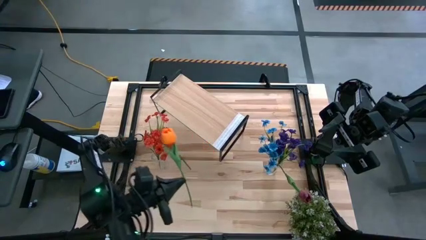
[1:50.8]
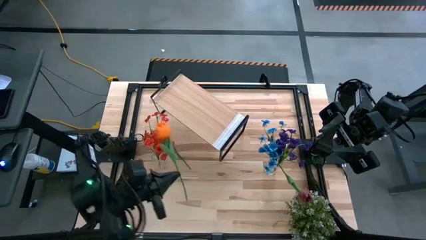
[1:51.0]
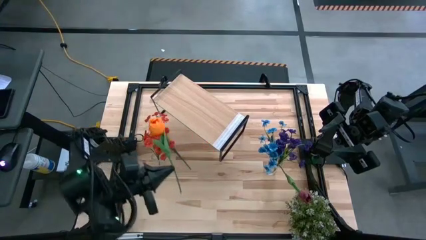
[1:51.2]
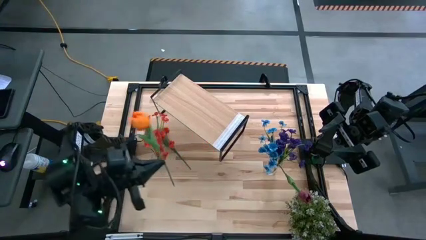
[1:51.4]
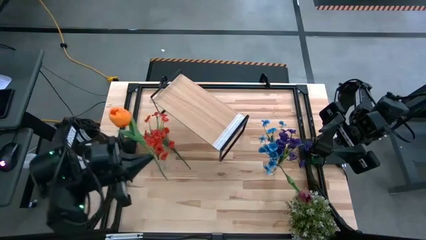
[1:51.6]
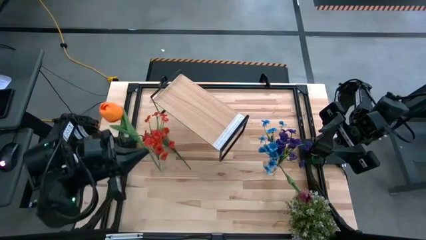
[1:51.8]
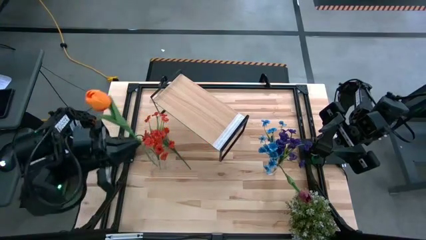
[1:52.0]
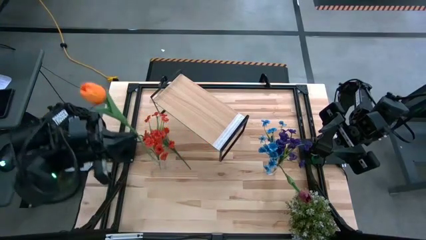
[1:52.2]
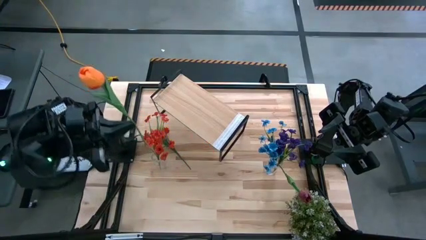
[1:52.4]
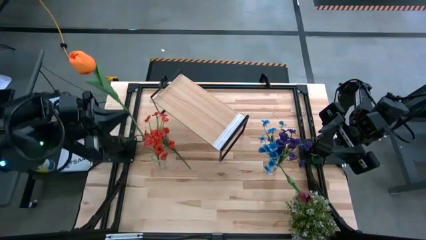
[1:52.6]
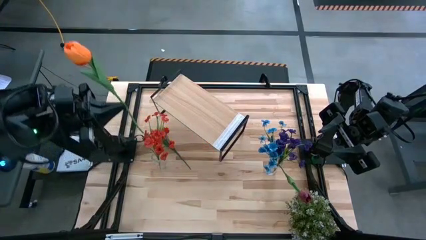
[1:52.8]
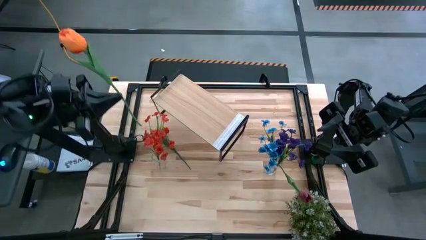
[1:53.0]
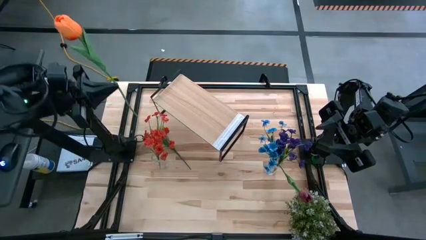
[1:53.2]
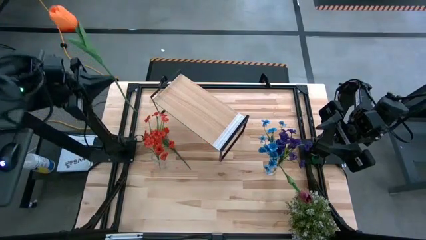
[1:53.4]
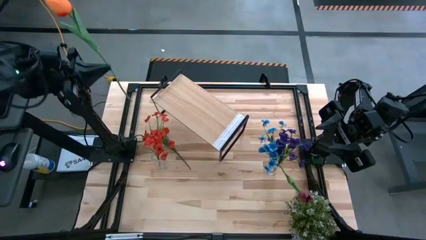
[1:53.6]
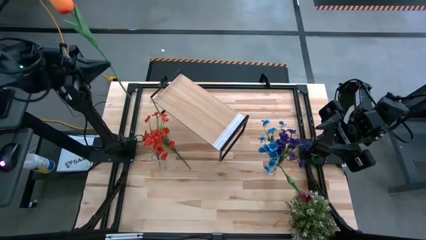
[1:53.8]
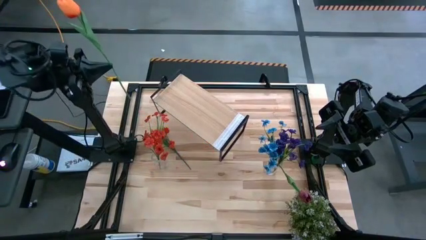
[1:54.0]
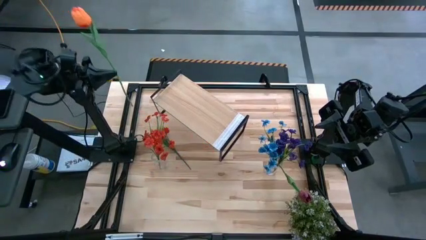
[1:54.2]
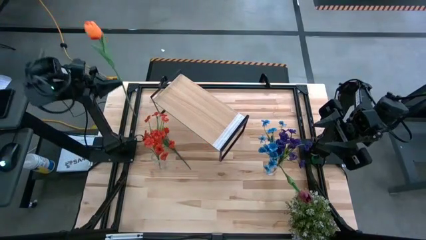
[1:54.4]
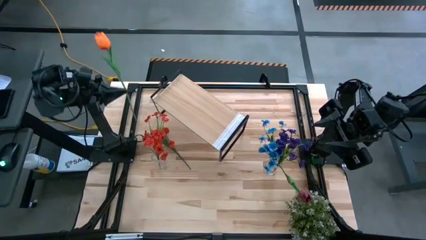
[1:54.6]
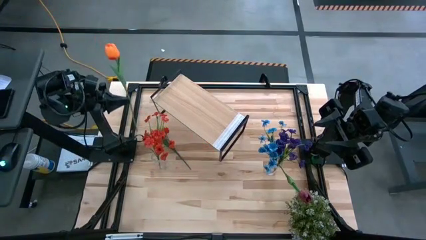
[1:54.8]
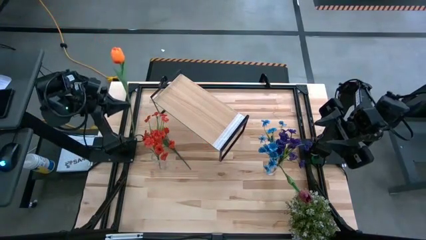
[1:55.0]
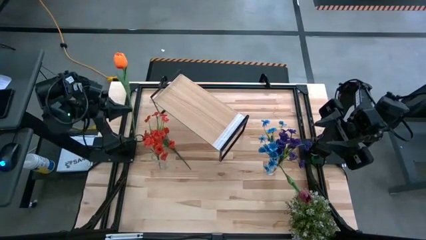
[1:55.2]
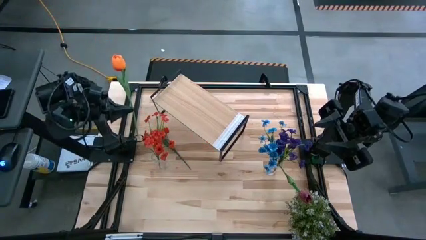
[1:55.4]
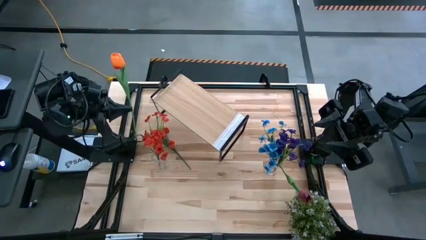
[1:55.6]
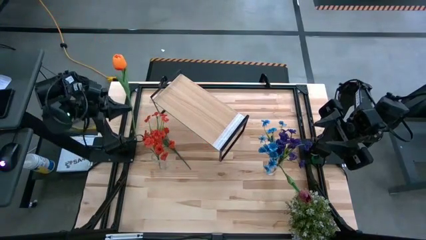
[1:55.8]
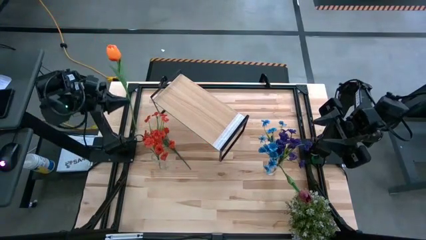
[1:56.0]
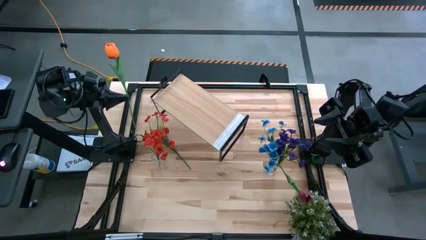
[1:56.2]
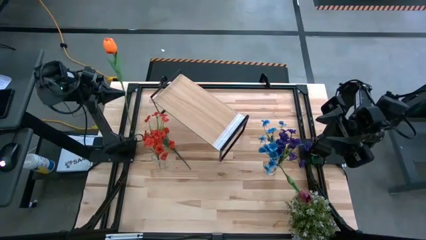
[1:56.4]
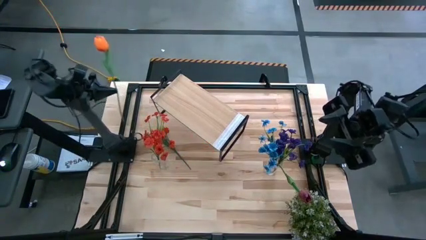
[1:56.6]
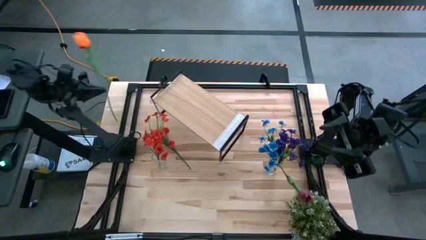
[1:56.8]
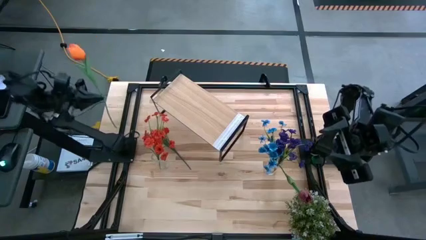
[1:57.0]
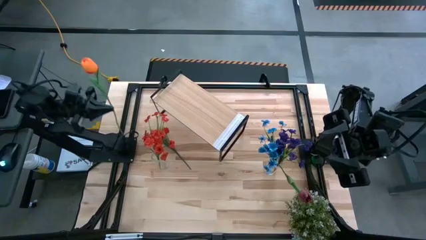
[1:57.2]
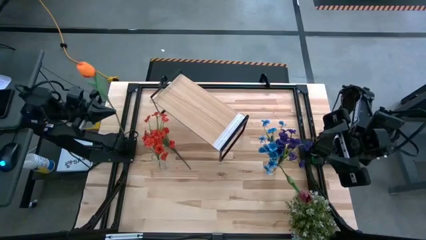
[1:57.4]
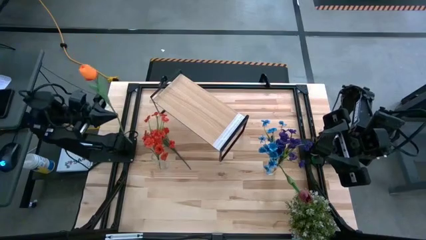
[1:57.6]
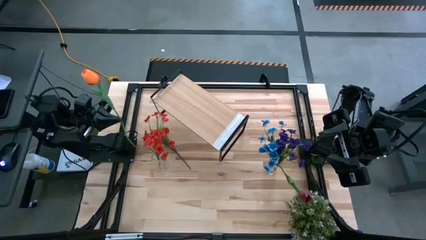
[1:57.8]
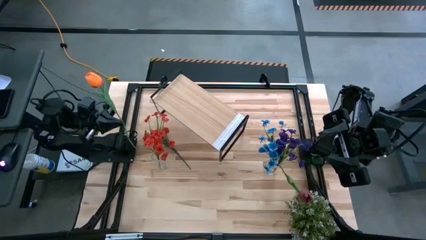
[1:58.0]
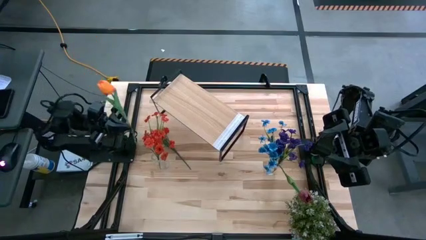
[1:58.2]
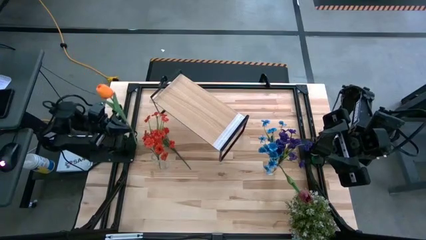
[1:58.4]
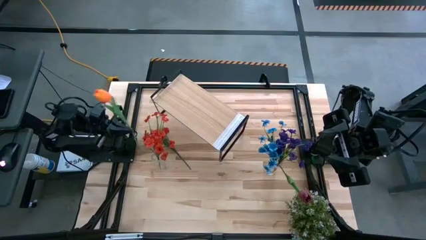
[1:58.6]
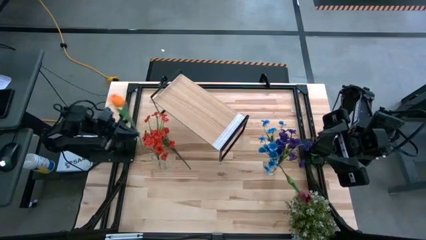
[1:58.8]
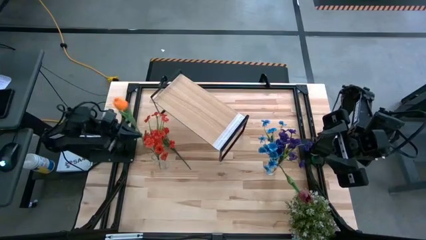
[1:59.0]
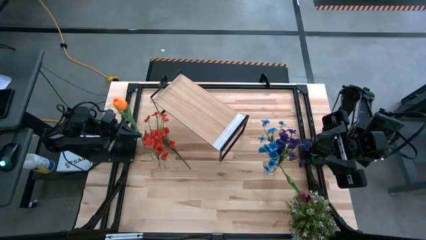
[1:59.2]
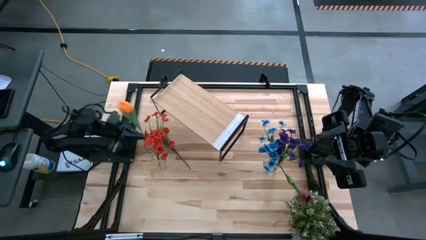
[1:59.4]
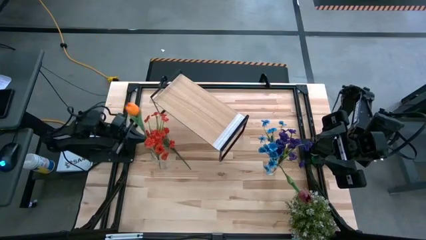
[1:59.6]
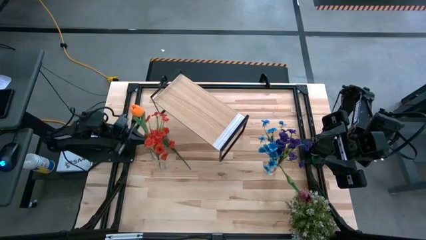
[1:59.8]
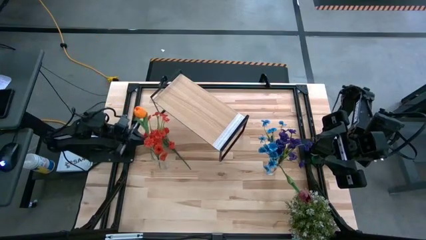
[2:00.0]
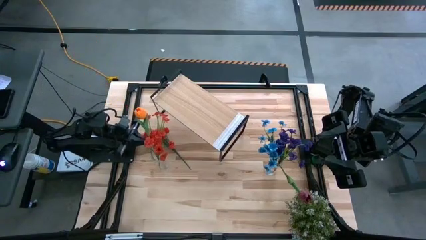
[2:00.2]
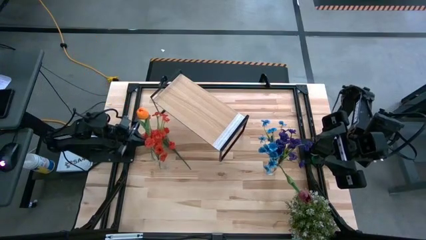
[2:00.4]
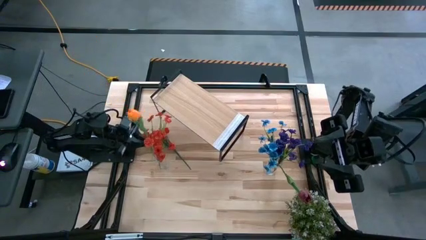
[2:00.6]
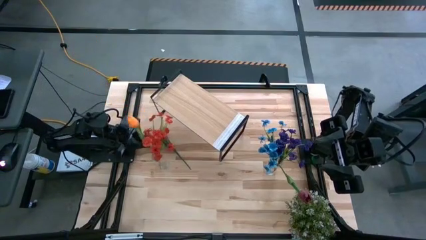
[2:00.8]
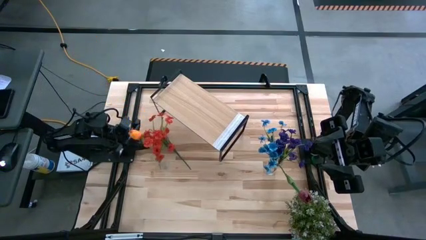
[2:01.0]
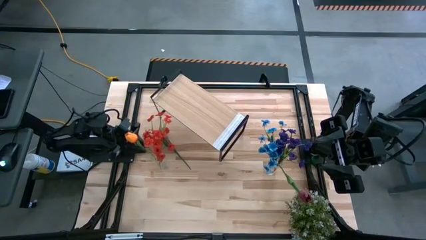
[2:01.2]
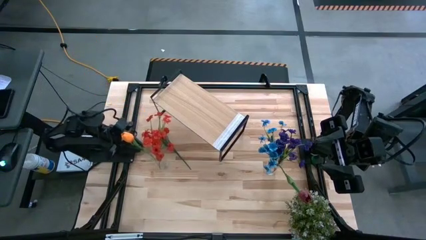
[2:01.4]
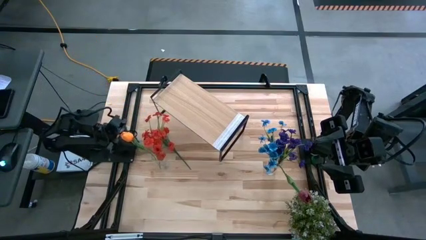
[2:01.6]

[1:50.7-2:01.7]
Task: Pick and place flowers into a vace then onto a shelf
Put the orange tulip into the left transparent vase

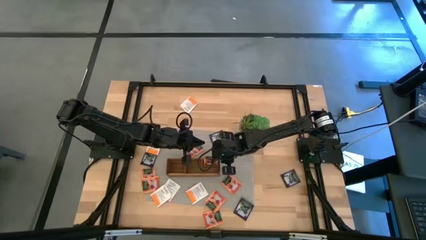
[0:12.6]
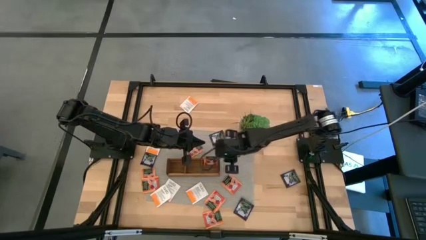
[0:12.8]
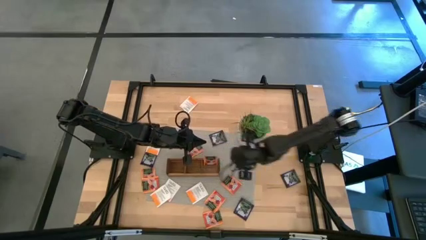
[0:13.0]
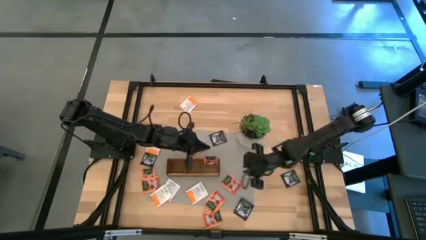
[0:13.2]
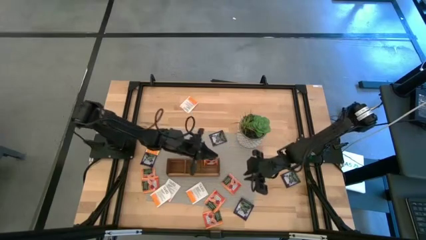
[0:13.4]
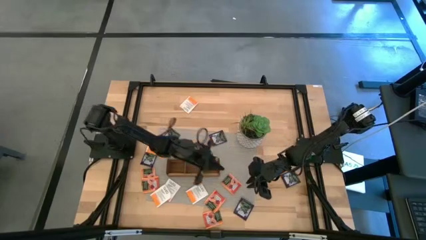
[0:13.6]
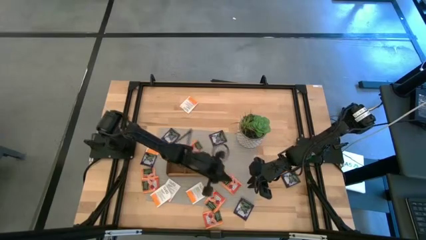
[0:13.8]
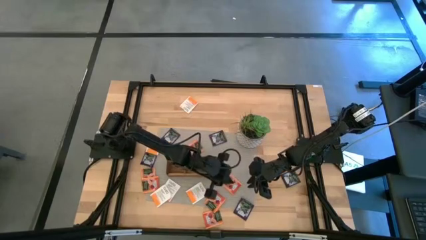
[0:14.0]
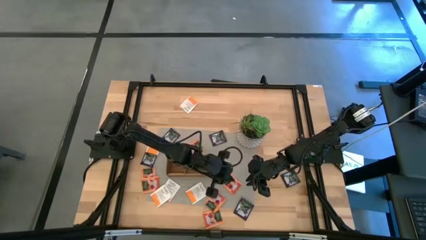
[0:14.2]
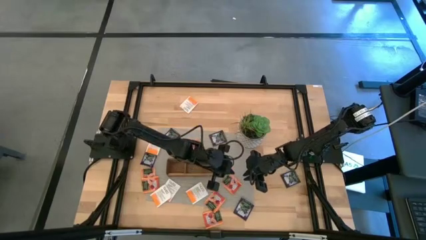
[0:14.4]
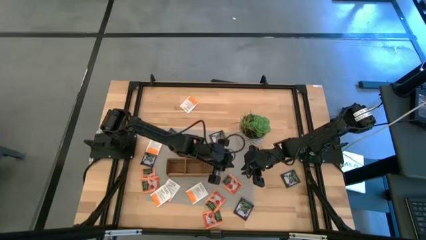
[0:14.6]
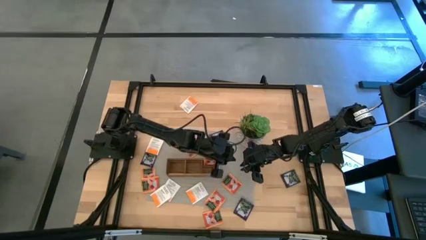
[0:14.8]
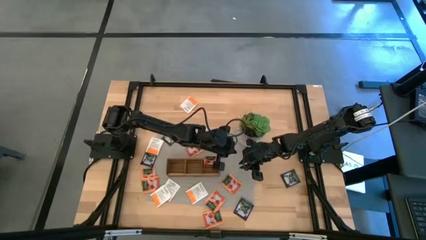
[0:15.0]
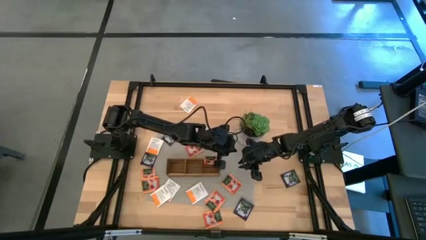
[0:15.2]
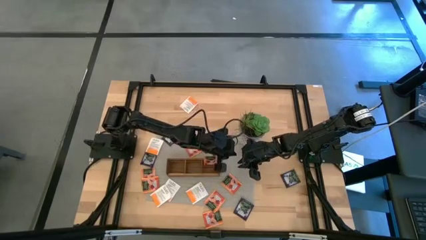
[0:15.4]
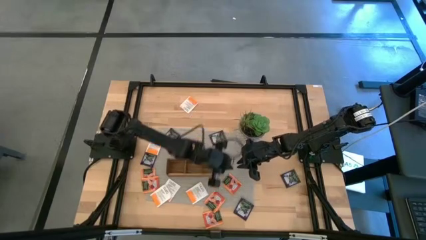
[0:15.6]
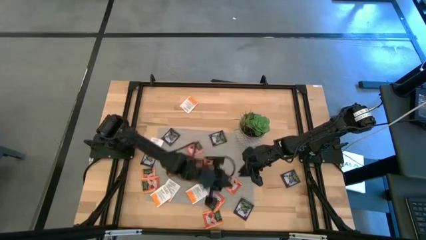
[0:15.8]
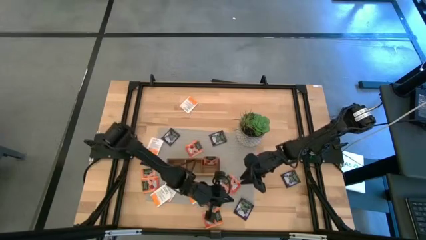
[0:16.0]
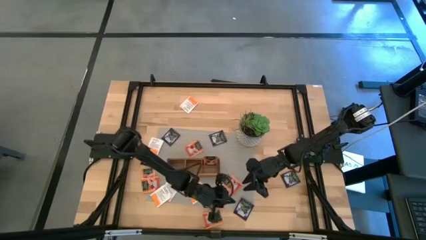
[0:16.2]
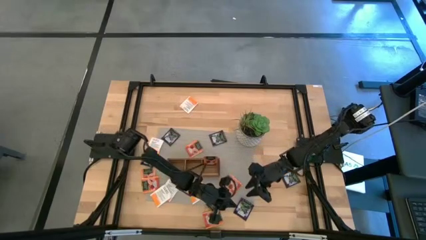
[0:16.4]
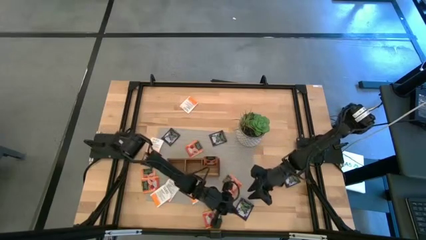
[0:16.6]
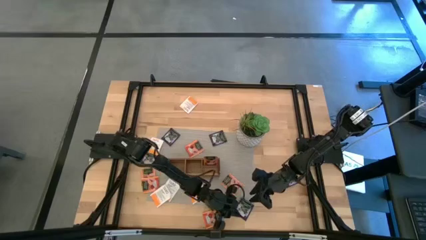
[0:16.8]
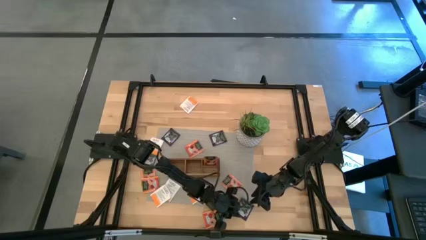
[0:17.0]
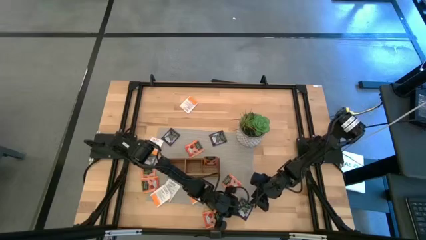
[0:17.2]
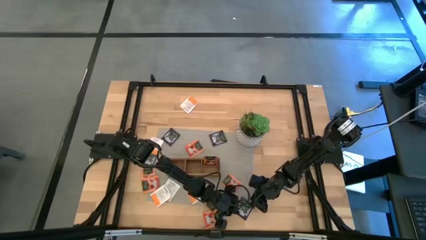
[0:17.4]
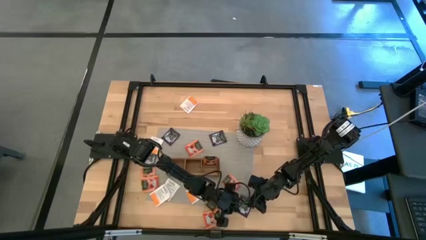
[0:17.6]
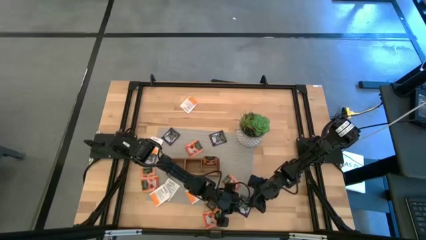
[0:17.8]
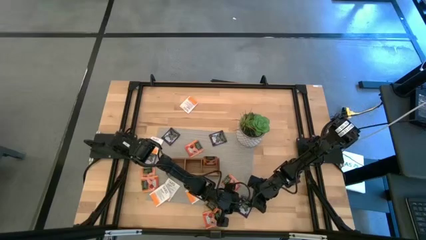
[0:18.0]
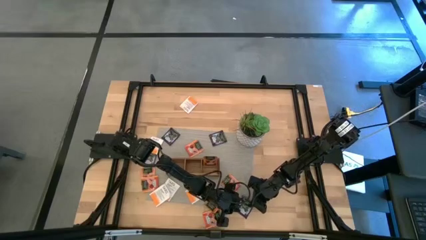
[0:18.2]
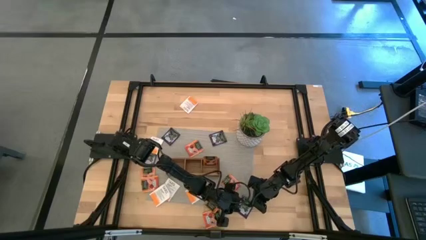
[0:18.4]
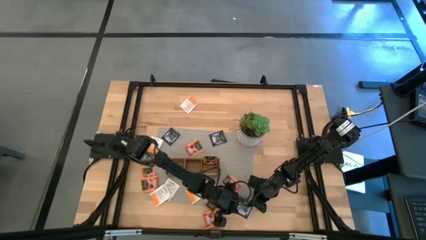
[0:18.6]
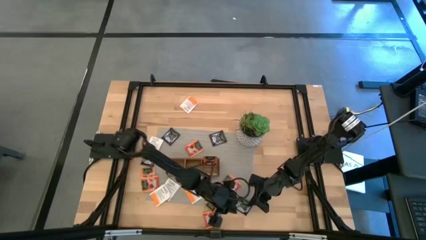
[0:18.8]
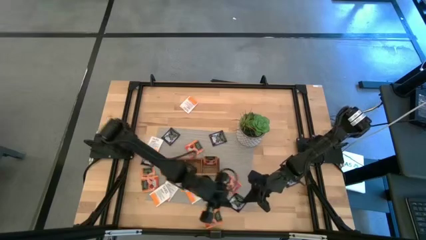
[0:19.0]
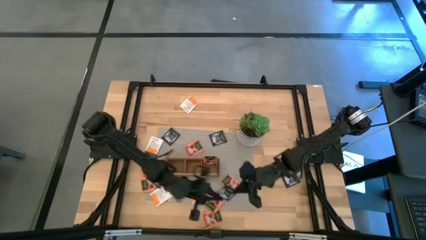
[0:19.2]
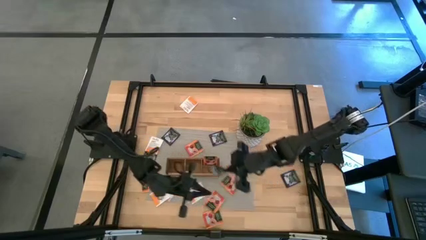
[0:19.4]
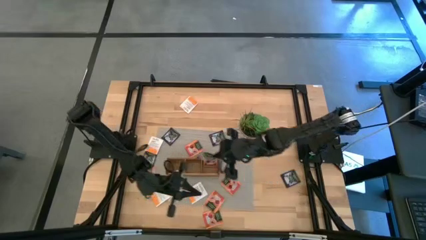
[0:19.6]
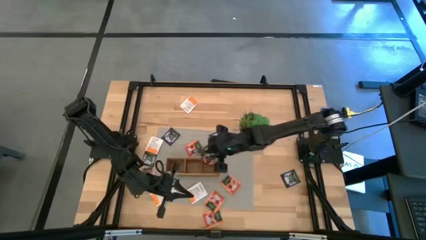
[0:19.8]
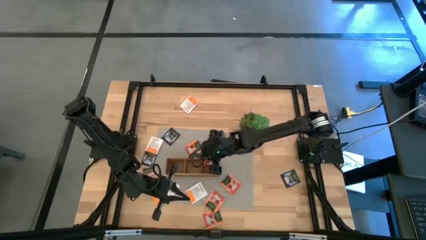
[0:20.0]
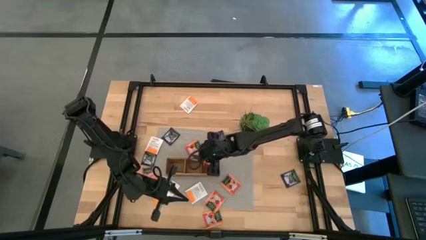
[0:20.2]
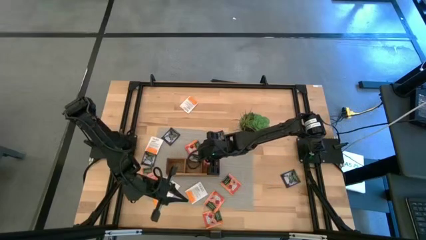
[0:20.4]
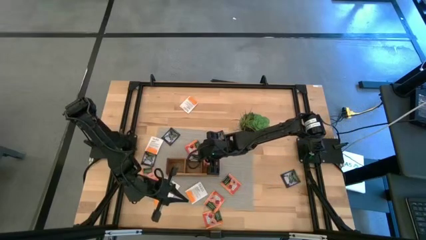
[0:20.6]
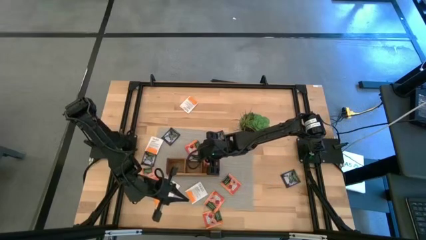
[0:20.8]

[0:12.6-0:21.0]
Task: Pick & Place Tea
Put the violet tea bag into the middle section of the wooden organizer
